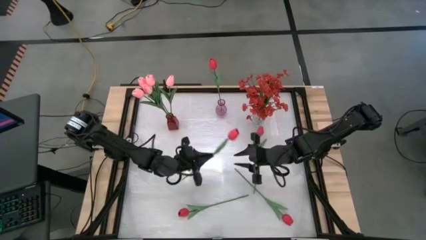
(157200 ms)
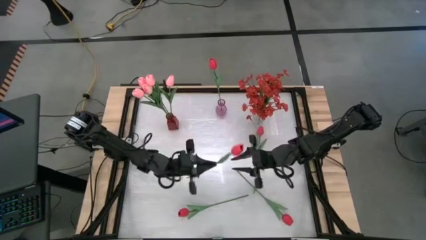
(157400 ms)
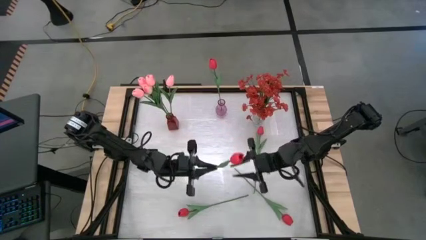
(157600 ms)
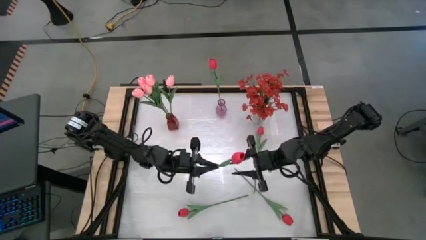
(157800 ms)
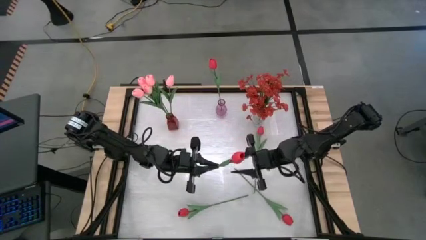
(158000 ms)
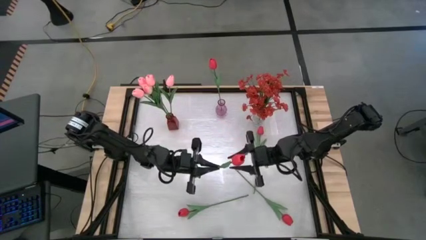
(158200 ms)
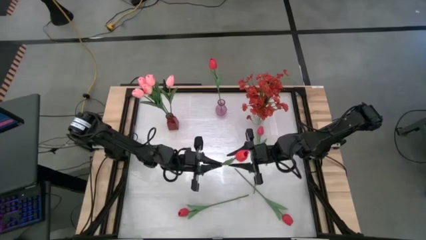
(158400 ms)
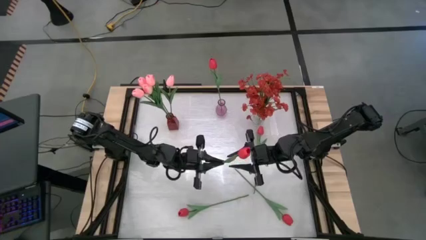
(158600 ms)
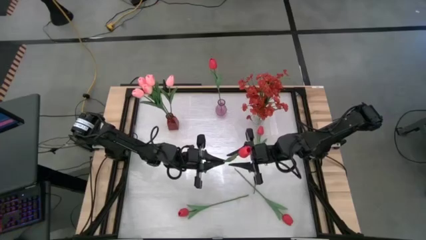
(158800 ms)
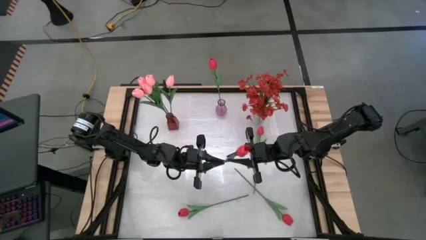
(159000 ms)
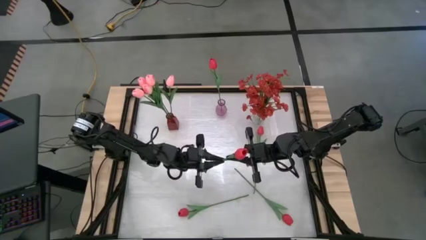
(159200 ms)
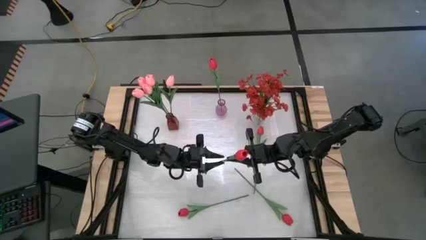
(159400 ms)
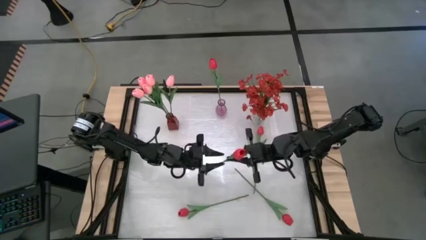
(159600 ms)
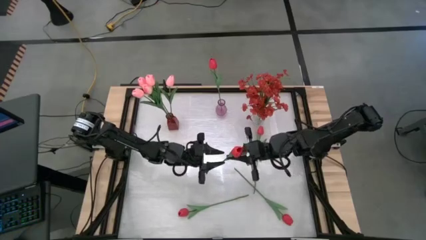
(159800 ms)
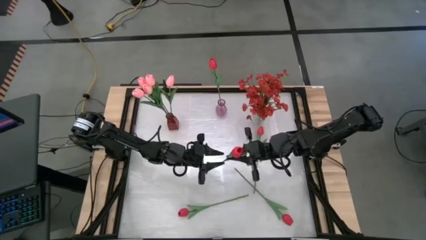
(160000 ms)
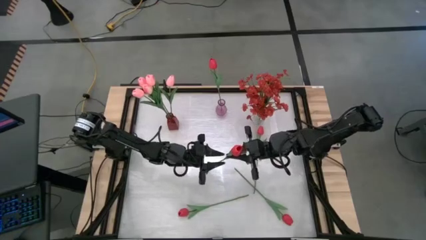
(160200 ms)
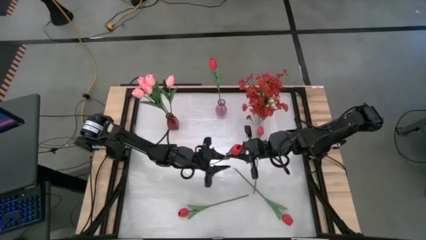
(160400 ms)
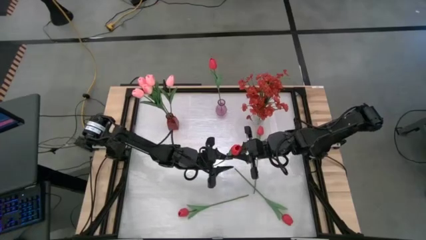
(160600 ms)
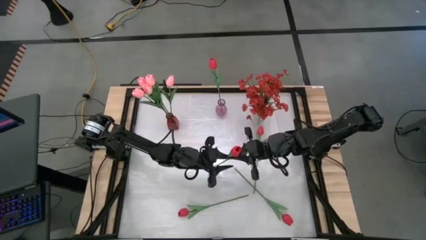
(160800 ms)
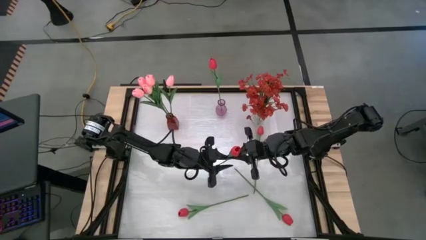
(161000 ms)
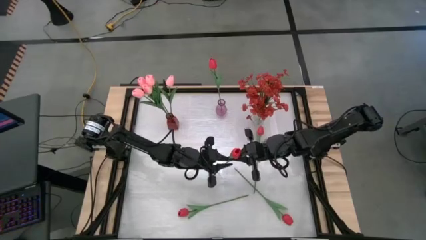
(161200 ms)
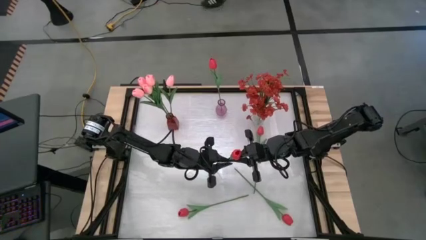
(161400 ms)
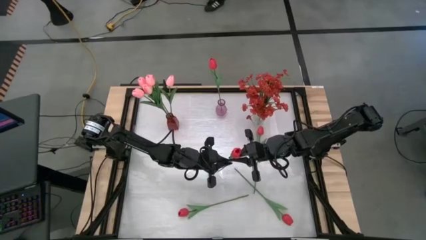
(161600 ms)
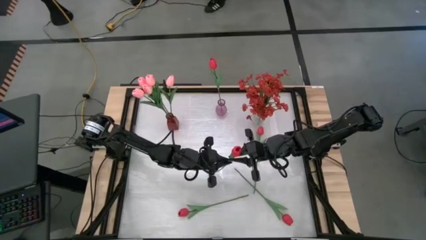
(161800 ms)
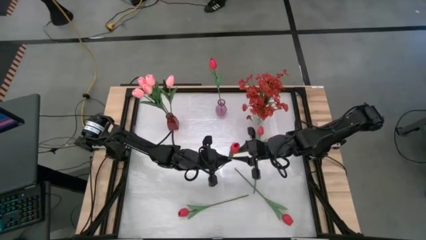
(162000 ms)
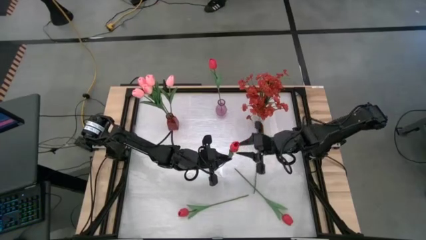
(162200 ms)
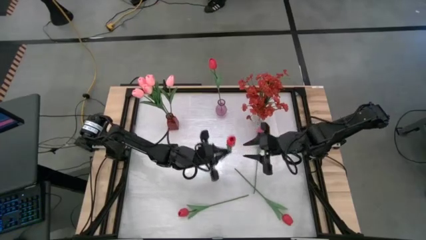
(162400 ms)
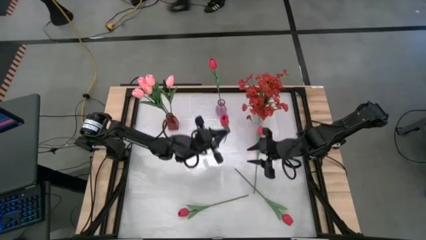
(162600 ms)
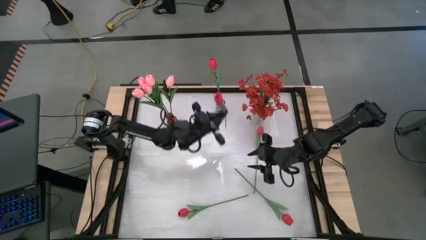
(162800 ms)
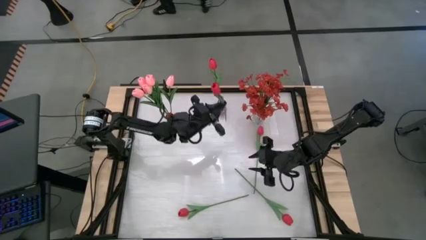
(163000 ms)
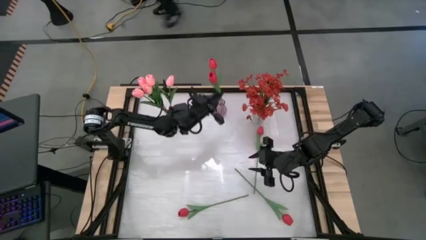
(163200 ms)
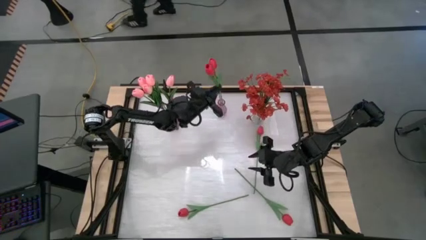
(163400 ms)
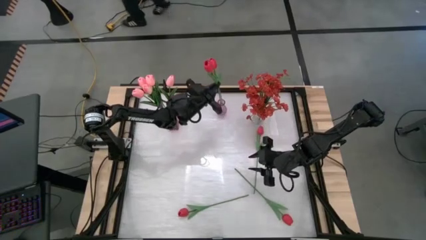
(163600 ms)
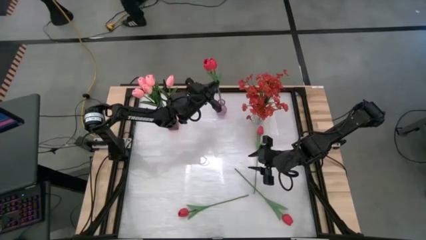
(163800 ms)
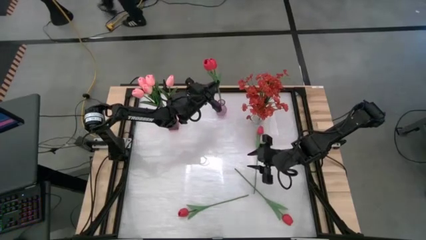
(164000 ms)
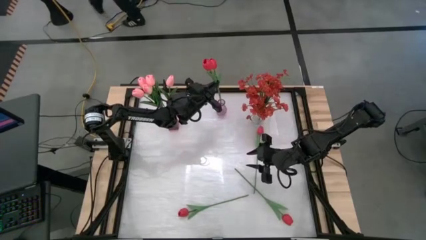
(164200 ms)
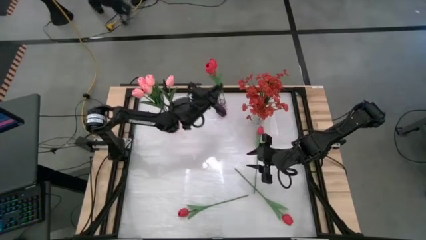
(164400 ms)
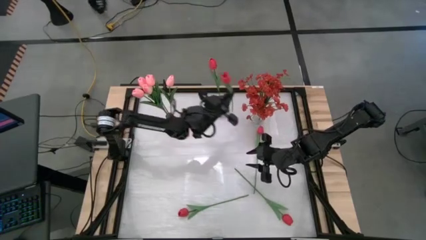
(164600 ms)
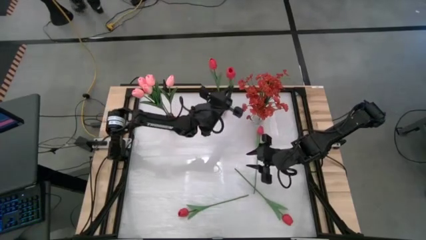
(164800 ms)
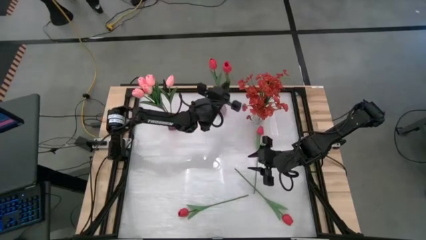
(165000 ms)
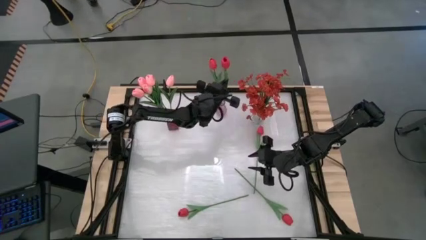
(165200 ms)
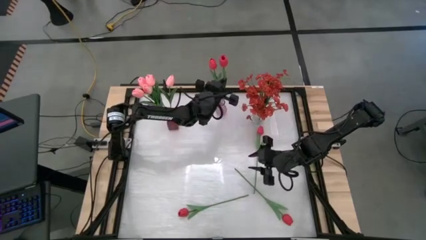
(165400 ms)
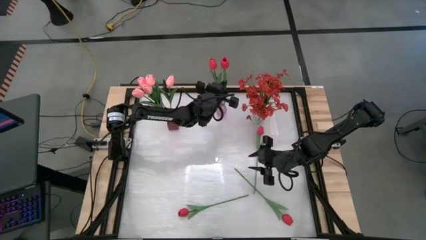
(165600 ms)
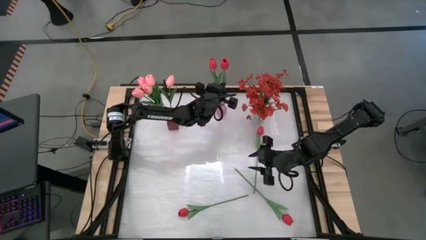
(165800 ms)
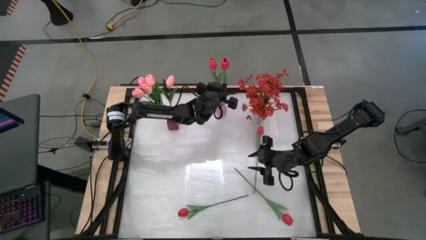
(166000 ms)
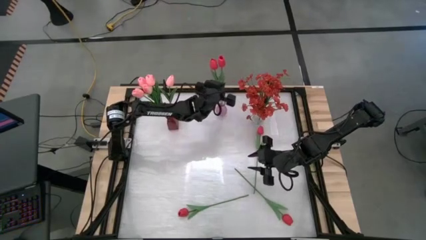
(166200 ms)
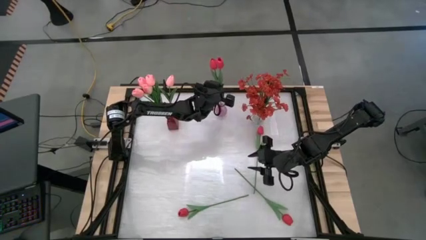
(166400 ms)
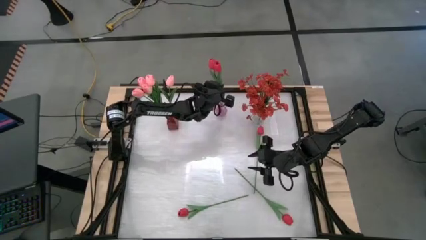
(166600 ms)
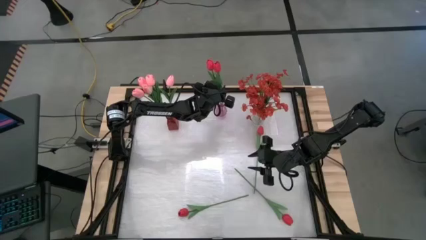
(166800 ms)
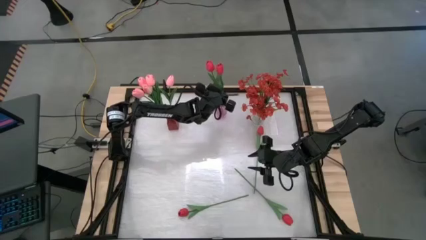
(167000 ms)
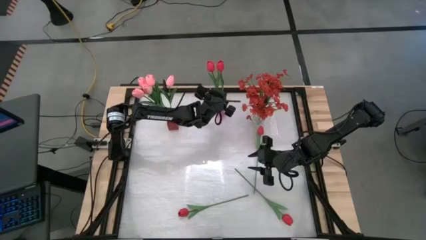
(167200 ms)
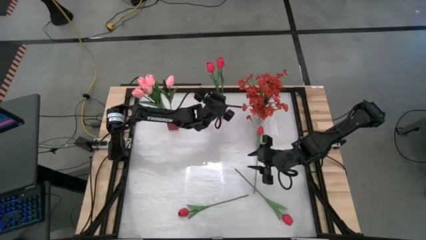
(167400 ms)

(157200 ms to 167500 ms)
Task: Sort flowers into vase by color
Put the red tulip into the purple vase

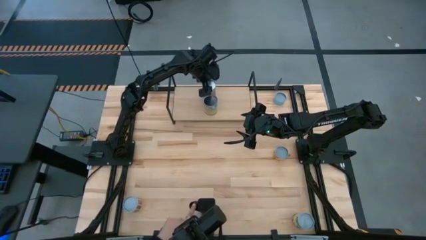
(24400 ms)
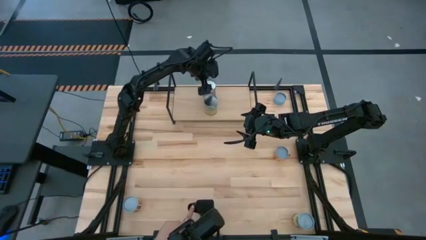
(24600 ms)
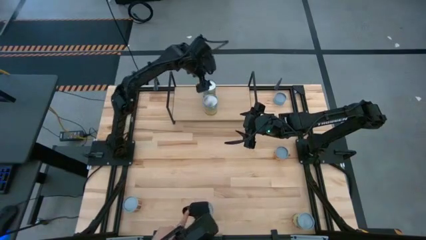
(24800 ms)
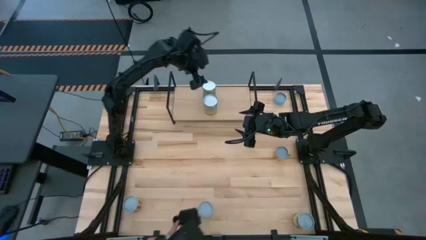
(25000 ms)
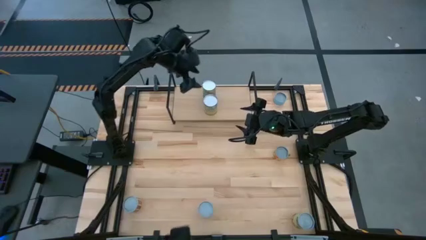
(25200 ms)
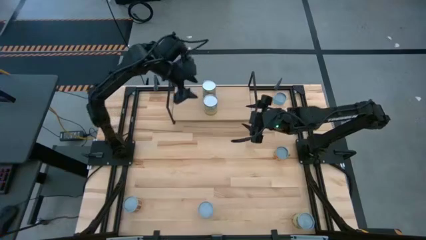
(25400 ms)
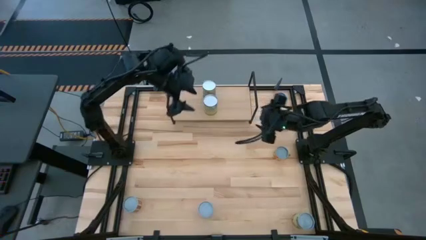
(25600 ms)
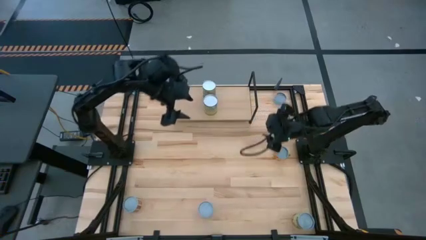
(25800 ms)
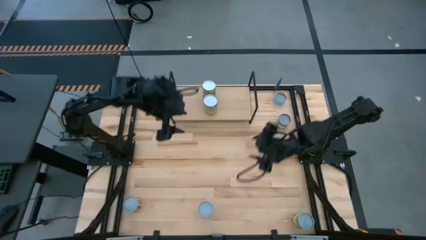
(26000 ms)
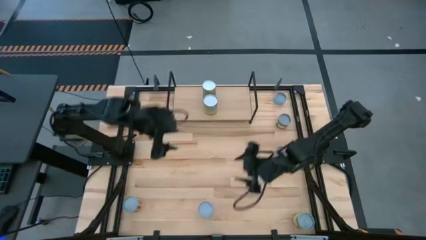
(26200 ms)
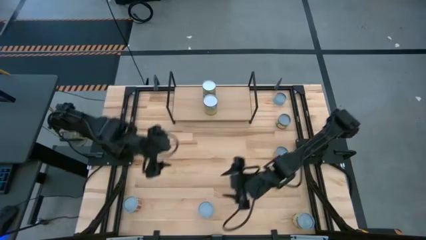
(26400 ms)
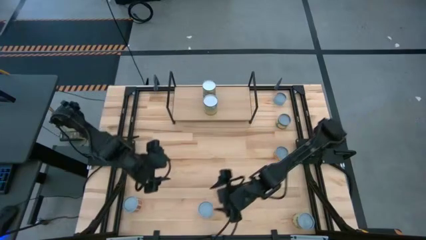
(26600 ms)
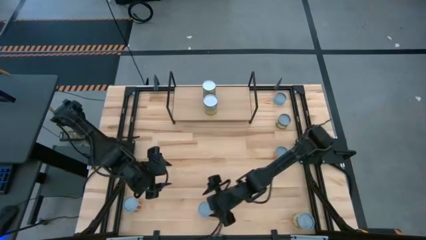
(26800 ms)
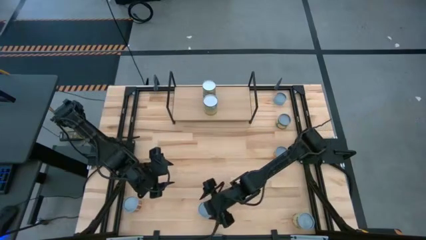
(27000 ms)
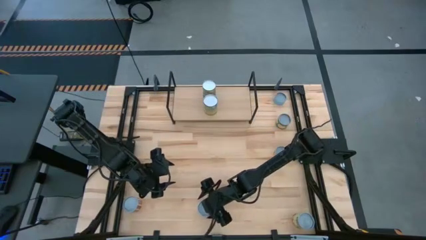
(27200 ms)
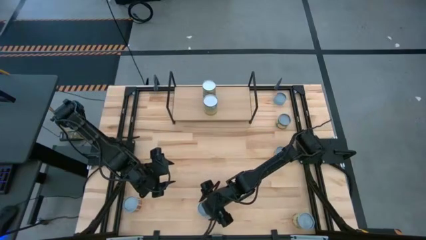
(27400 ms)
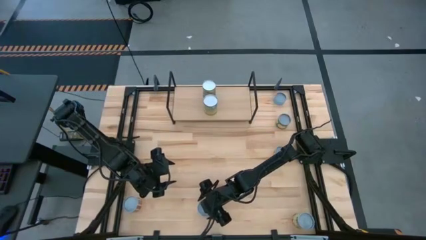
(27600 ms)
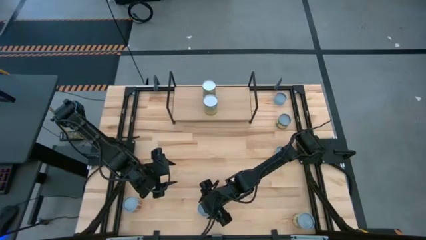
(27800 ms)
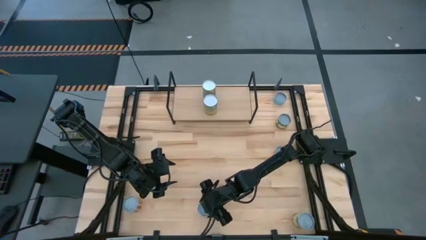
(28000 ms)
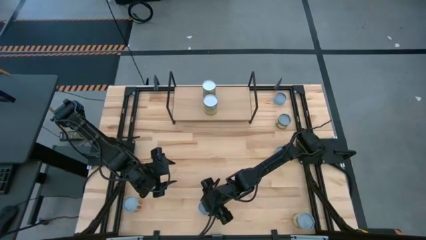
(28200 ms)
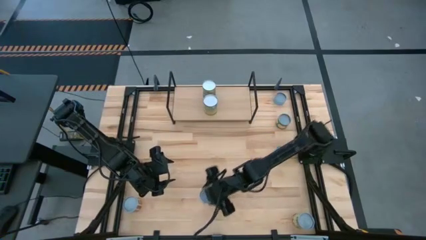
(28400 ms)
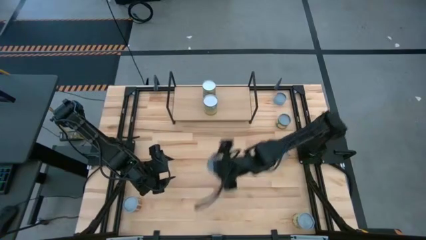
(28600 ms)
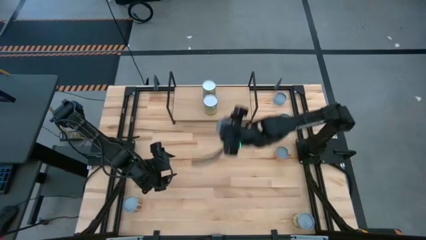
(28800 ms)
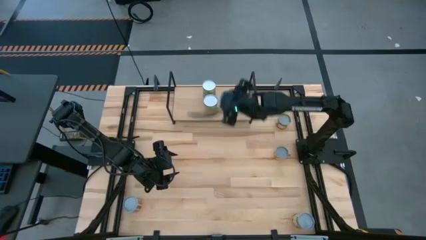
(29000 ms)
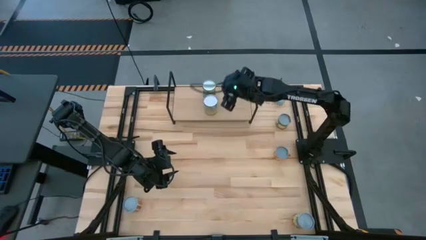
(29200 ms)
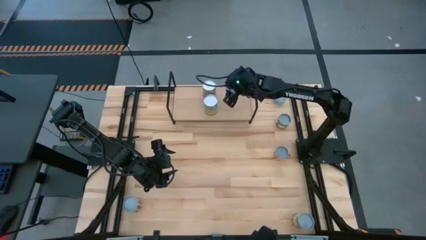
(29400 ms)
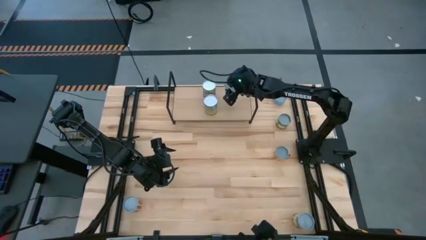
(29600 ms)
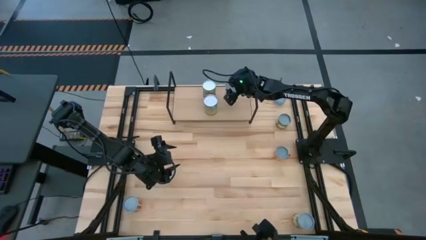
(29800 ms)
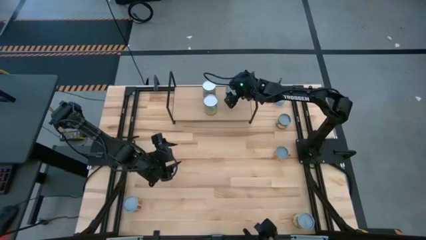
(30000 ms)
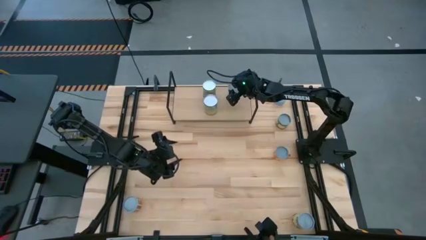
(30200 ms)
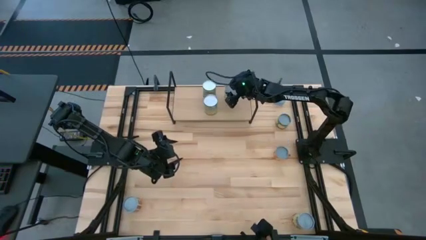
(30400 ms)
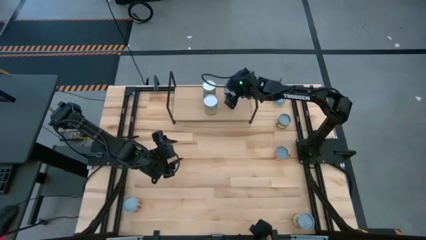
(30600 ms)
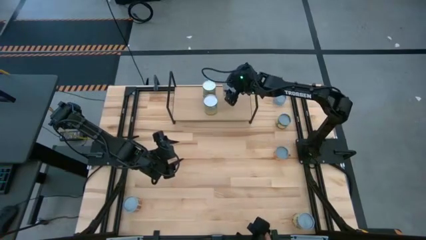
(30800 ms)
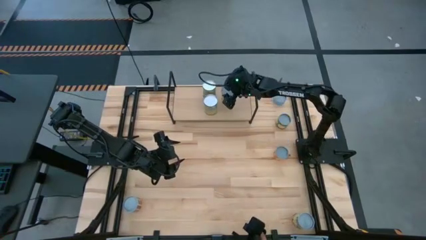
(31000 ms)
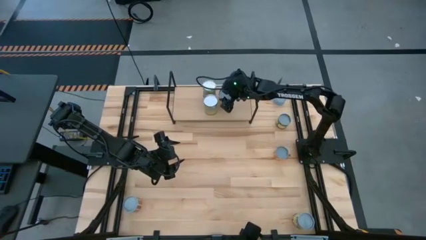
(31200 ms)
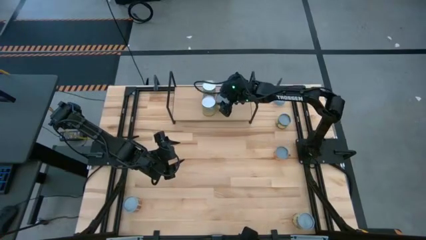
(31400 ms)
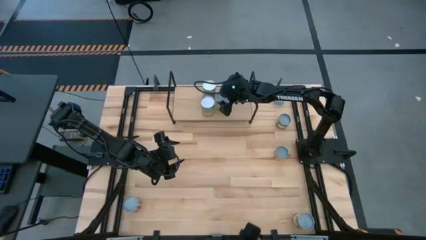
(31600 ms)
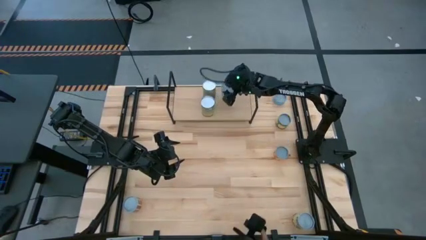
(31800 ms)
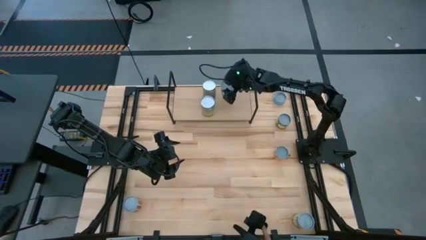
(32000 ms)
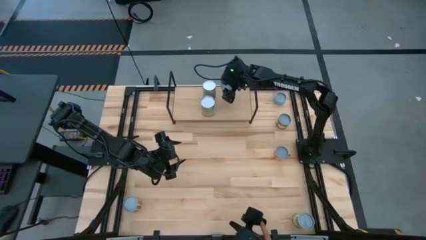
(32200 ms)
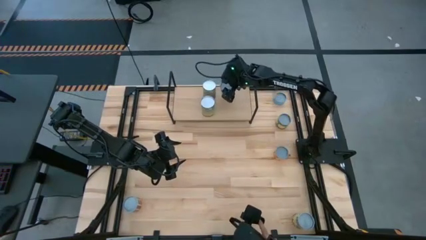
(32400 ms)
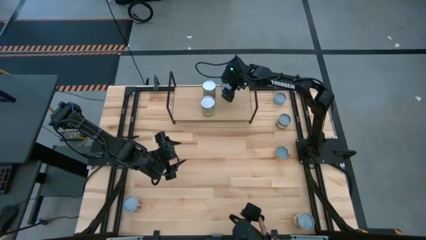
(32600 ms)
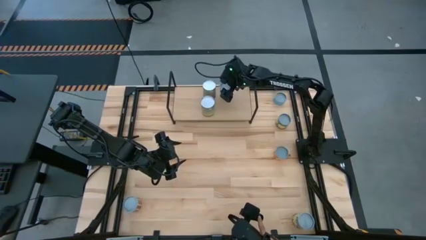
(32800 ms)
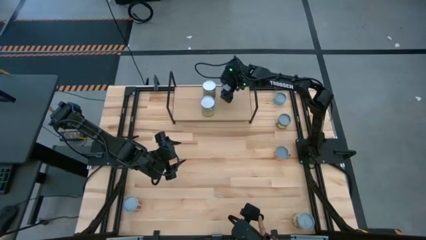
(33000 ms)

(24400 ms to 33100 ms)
Task: Pick and place cans onto a shelf
Put the canned mixed fruits on the shelf
